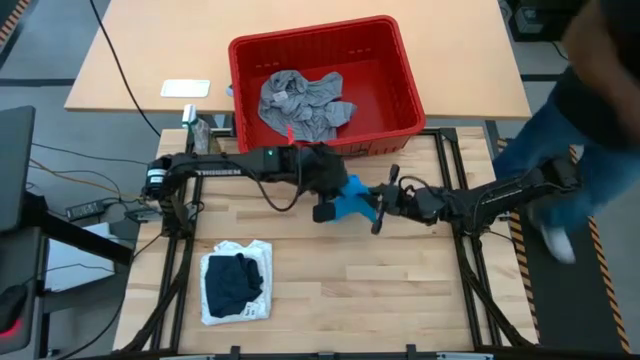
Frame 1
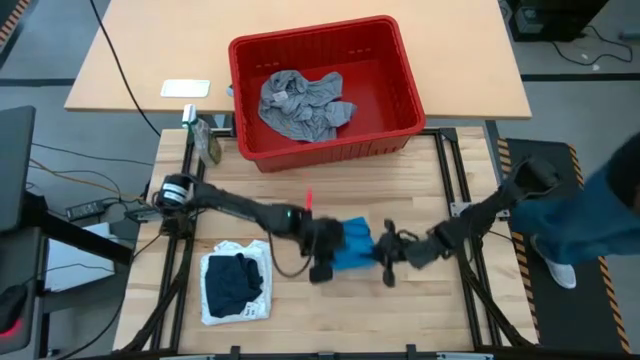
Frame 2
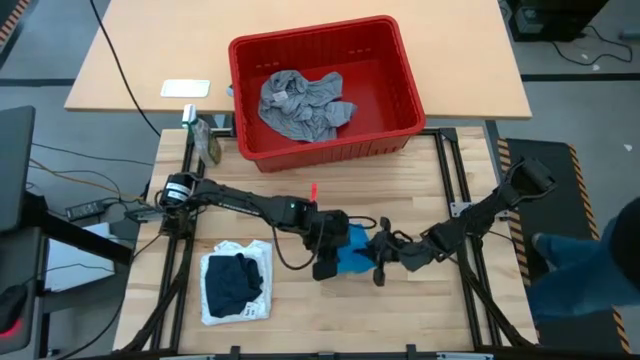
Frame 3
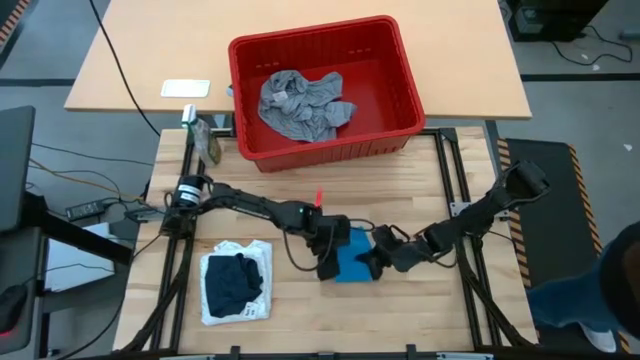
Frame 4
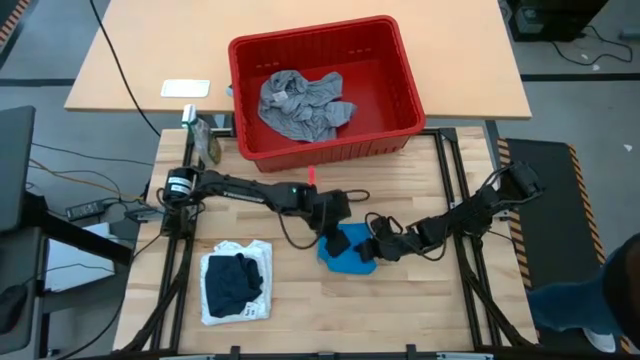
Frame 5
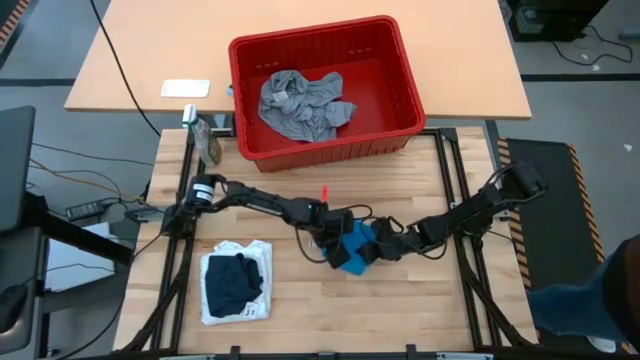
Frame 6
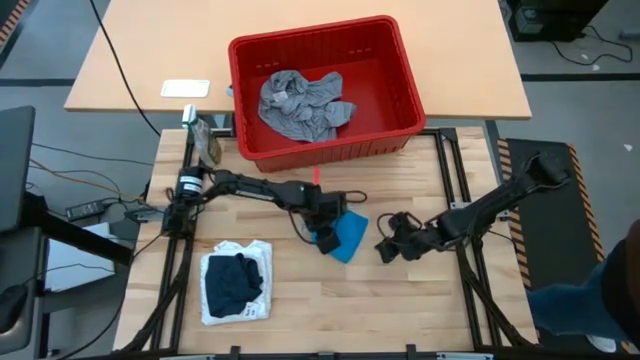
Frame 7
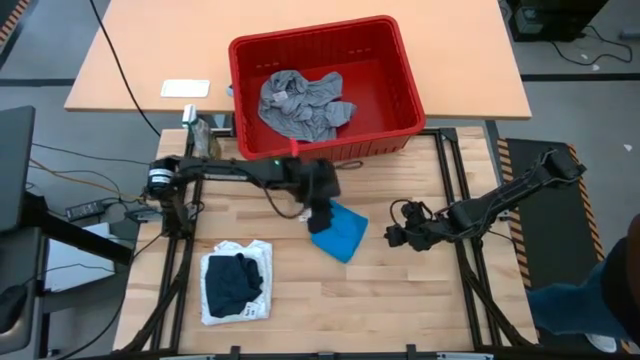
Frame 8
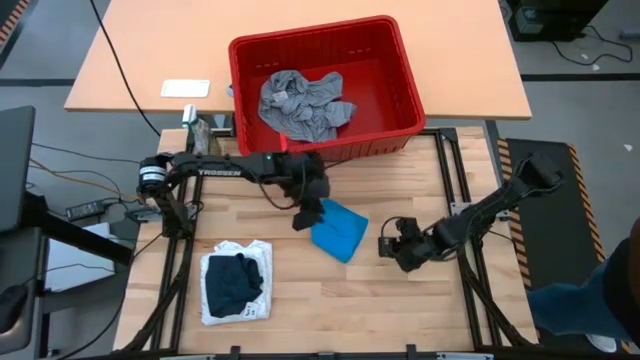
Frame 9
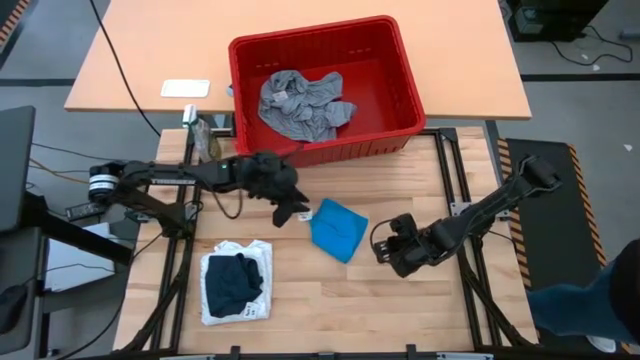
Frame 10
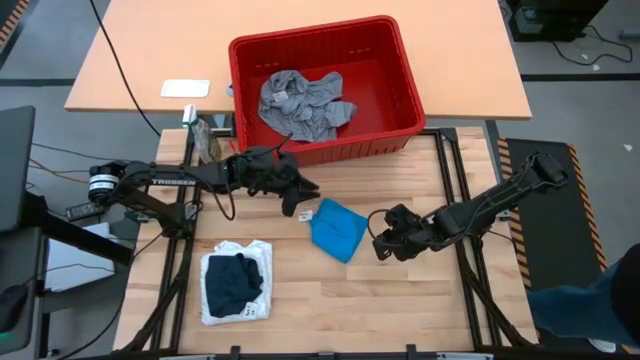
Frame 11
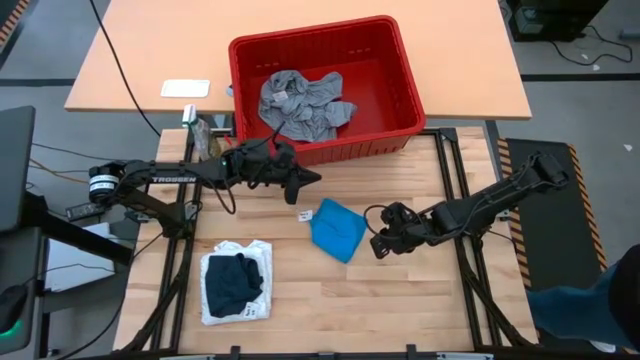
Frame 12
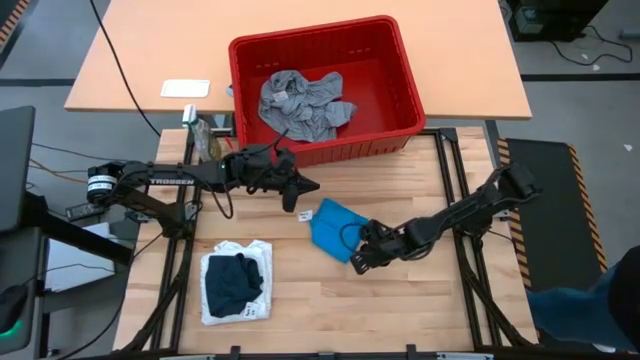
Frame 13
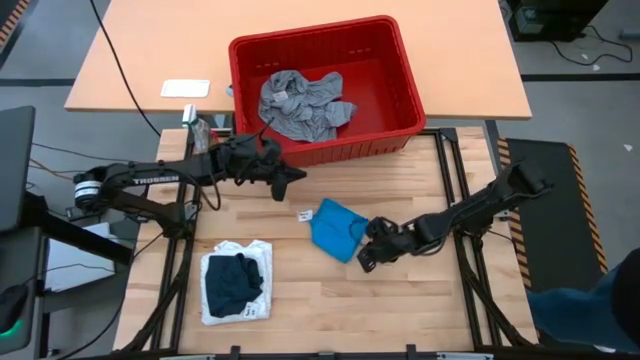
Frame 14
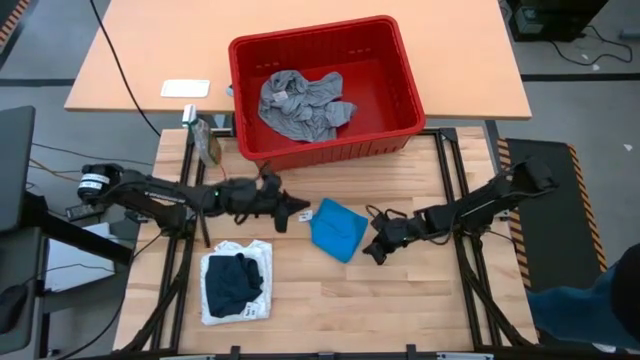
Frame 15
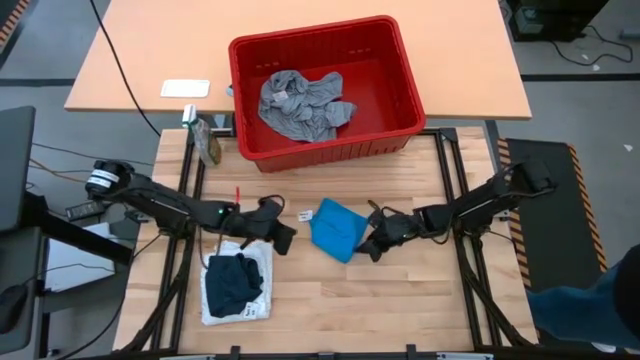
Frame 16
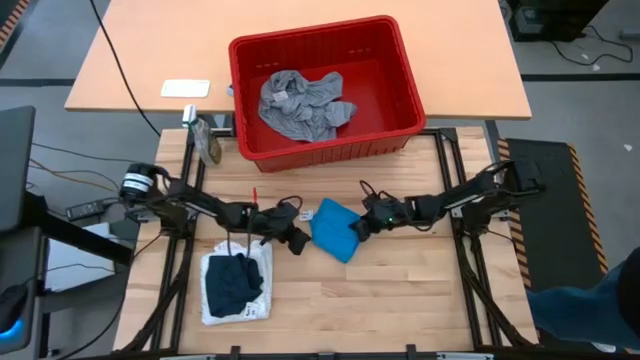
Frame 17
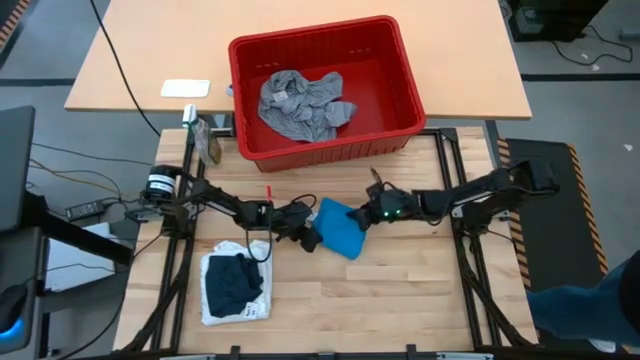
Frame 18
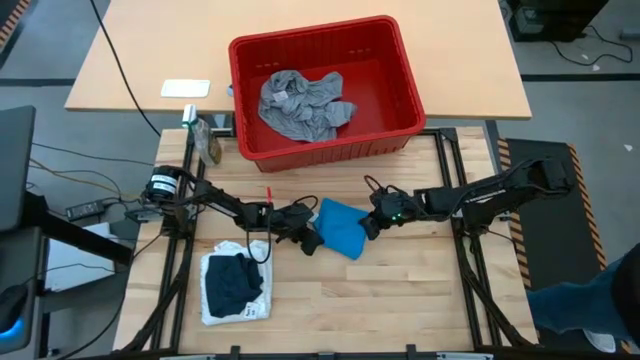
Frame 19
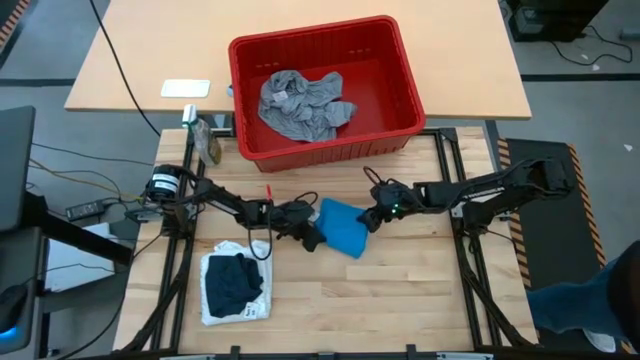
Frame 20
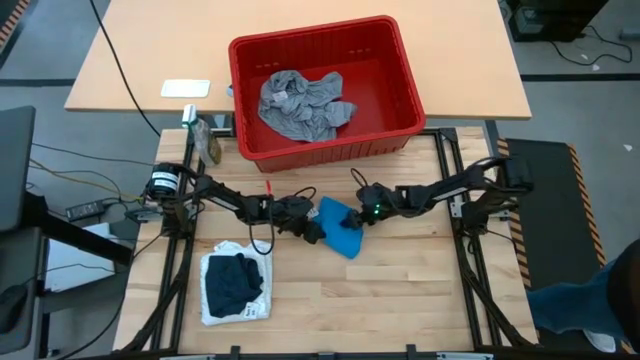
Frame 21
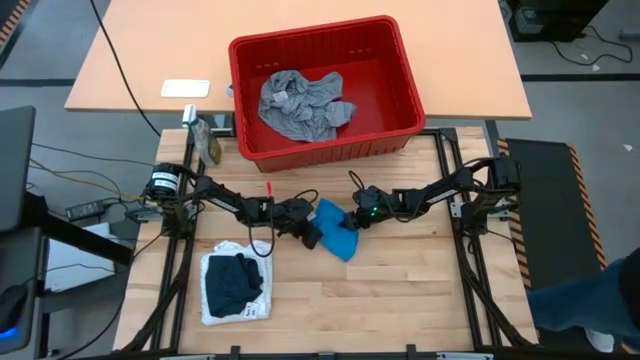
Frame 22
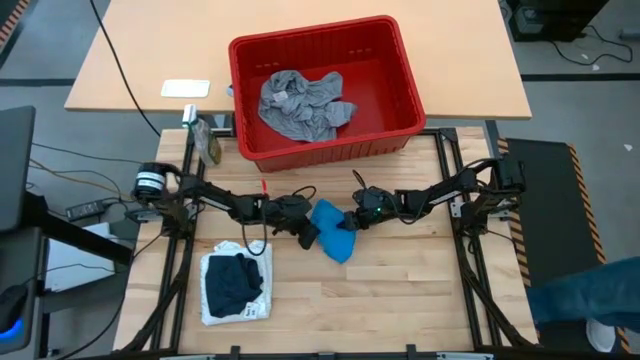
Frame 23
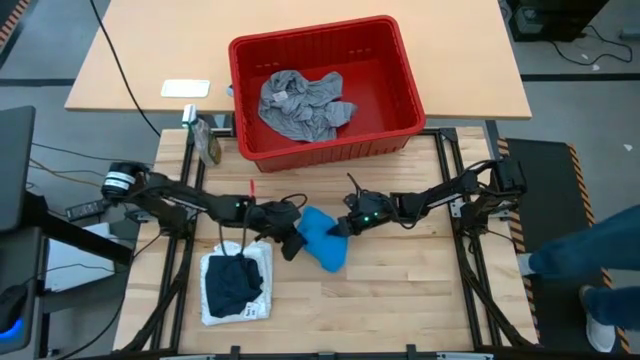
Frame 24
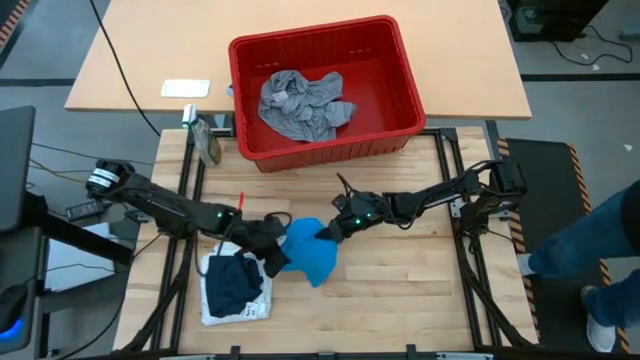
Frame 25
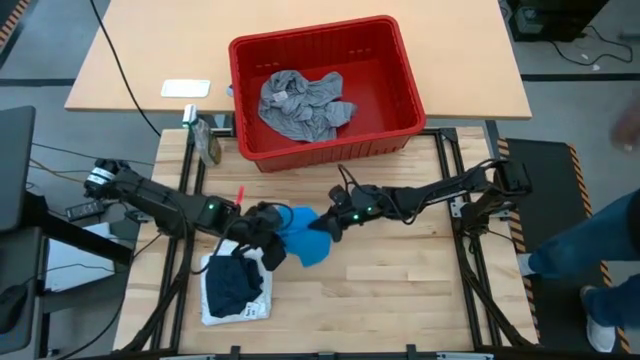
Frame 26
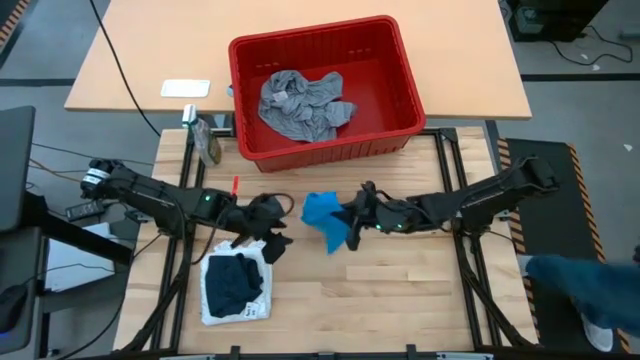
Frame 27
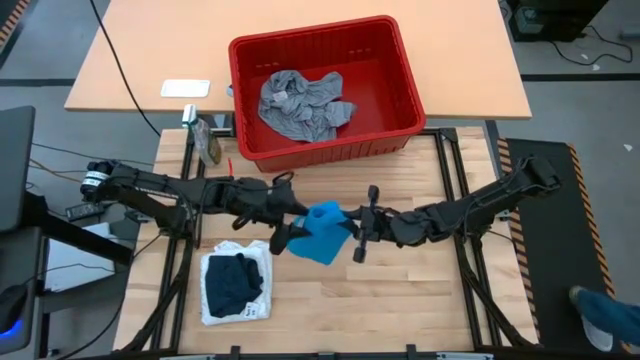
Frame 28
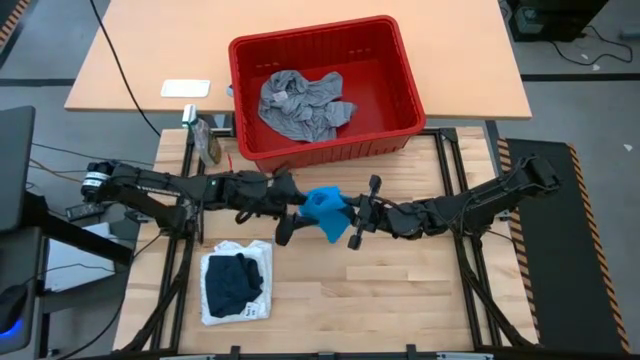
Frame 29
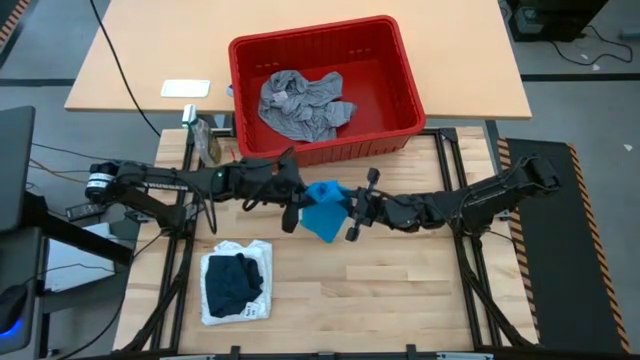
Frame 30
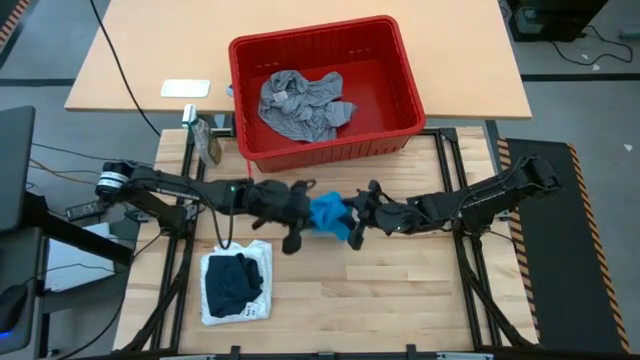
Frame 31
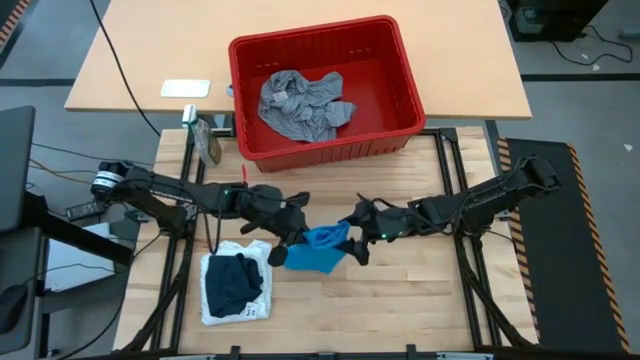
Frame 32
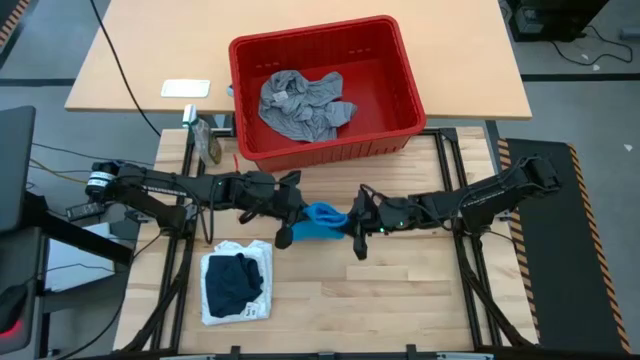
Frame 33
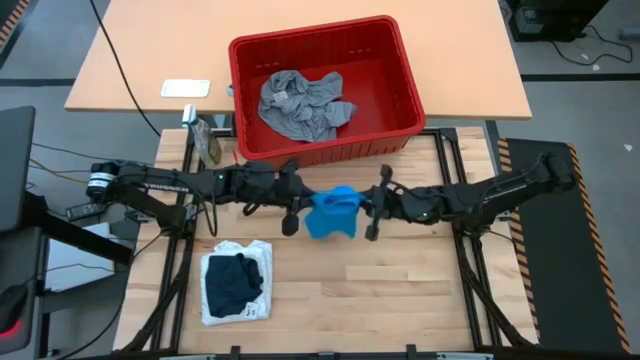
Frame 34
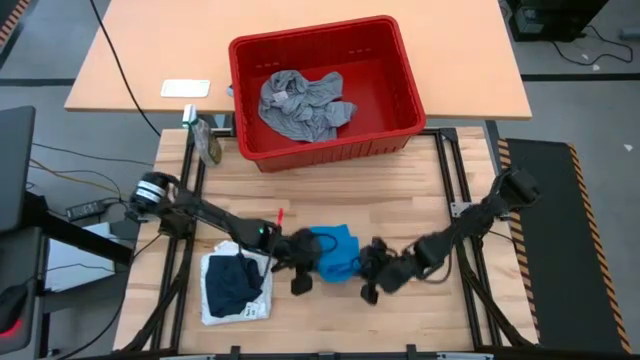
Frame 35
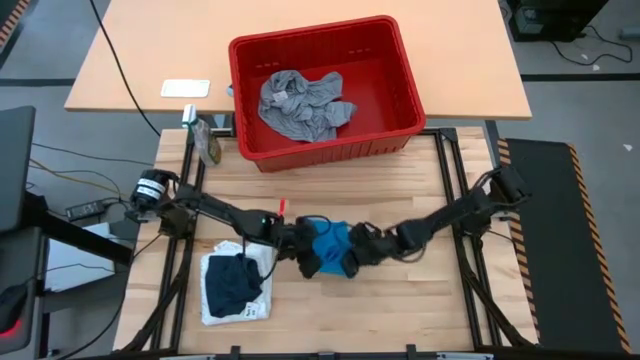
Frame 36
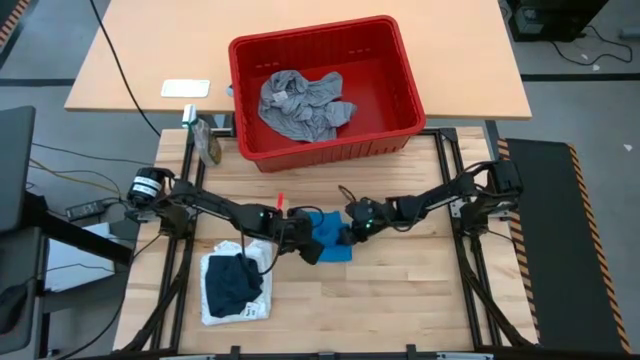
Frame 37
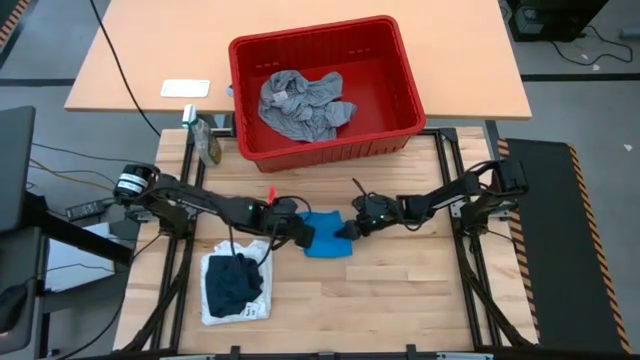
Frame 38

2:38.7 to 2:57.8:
Task: Fold laundry
Fold the light blue shorts

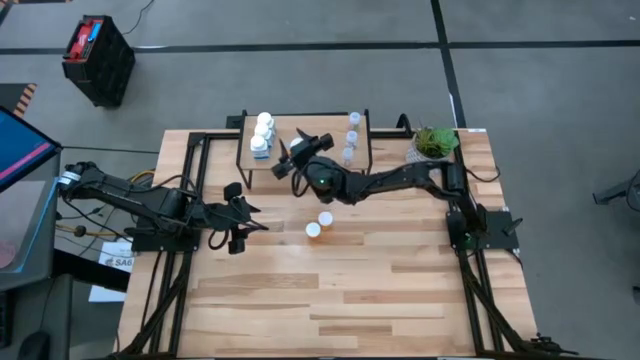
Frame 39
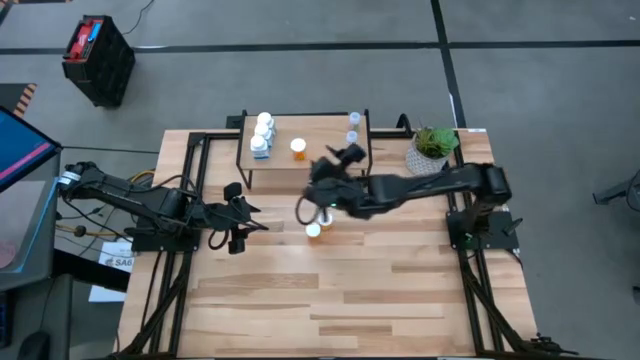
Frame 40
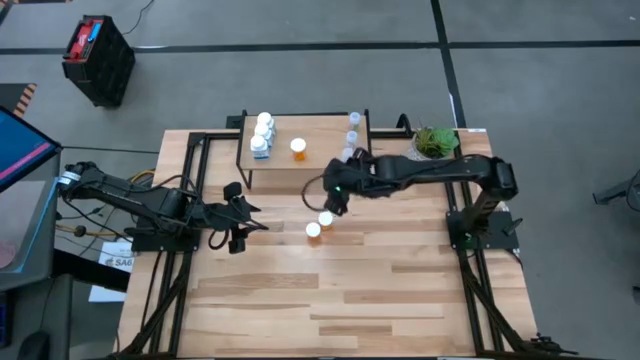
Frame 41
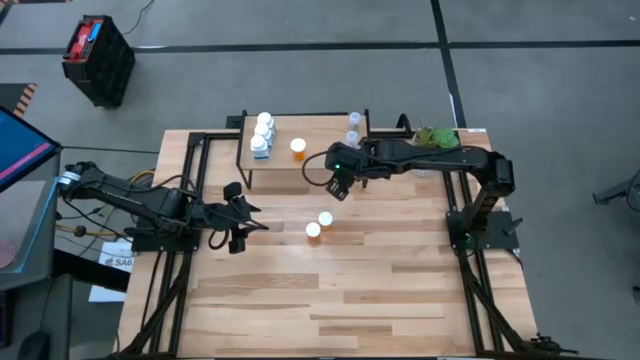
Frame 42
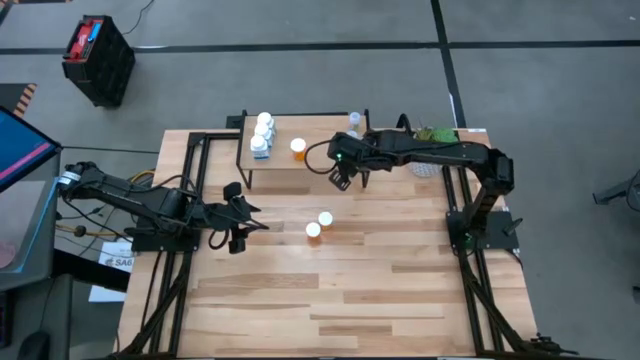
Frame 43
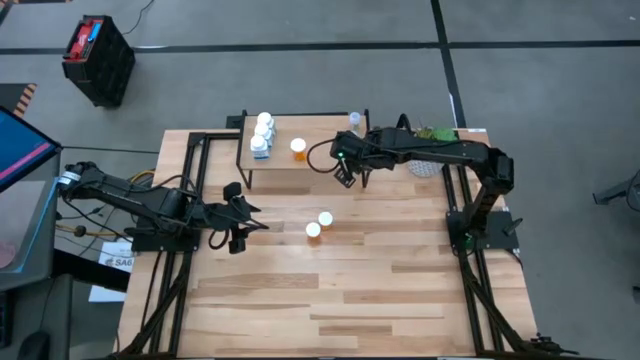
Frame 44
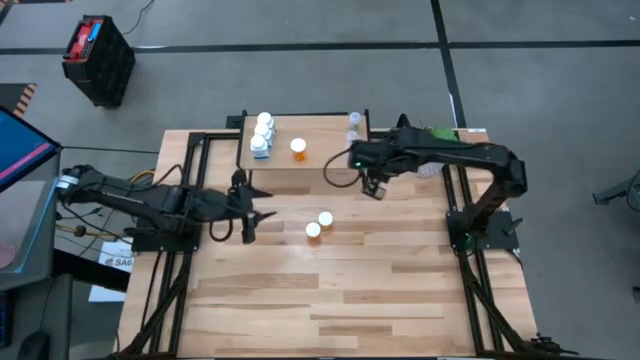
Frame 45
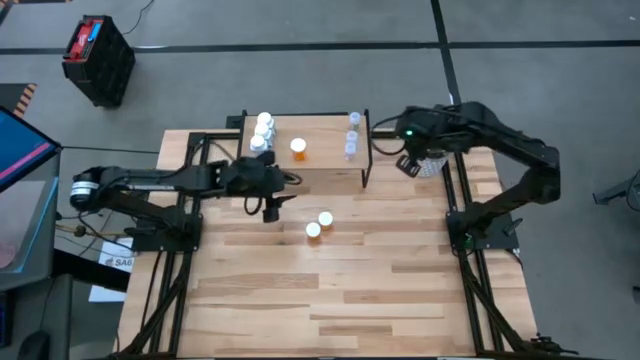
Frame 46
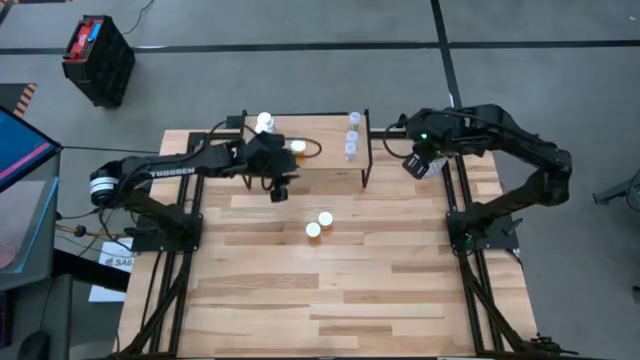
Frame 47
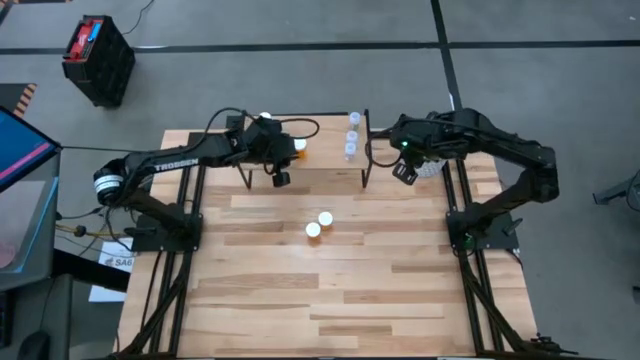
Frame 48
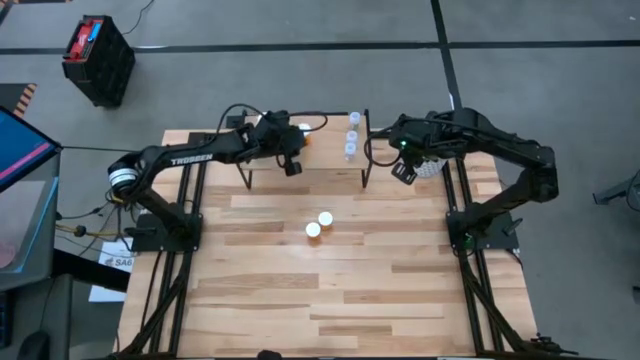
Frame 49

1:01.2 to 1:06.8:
Task: Pick and place medicine bottles onto shelf by color
Adjust the pill bottles on the shelf
